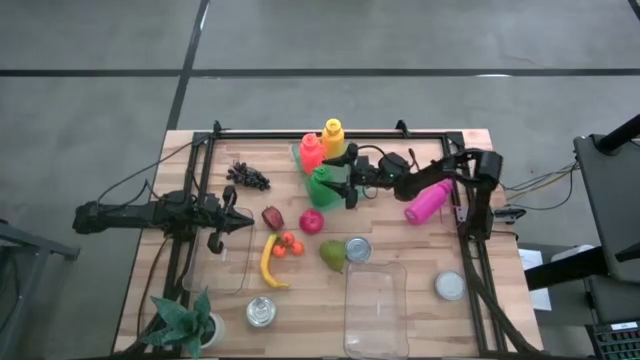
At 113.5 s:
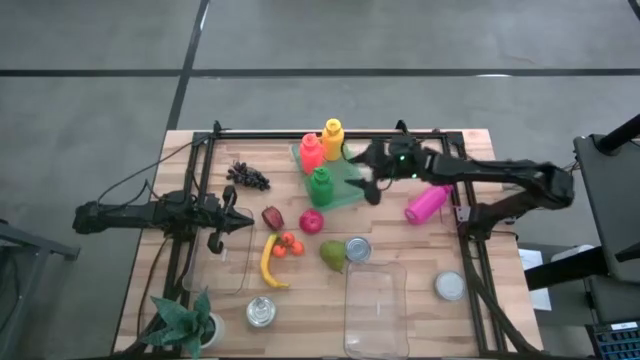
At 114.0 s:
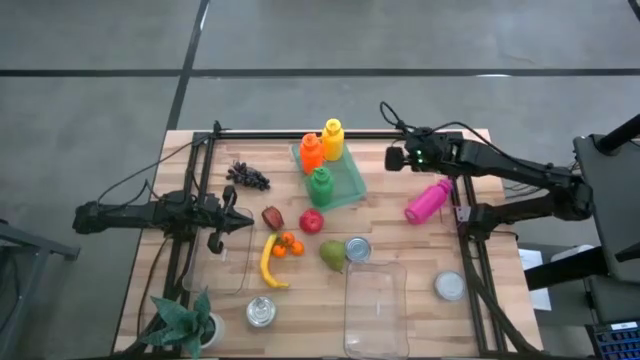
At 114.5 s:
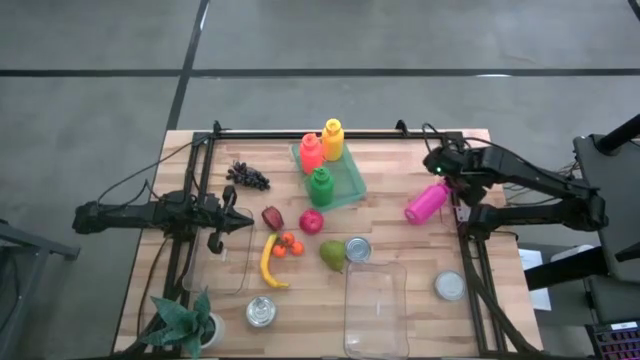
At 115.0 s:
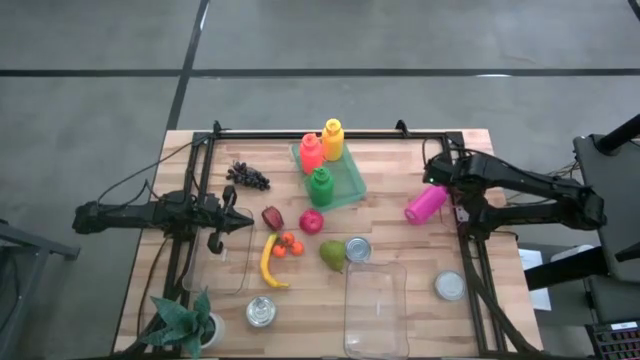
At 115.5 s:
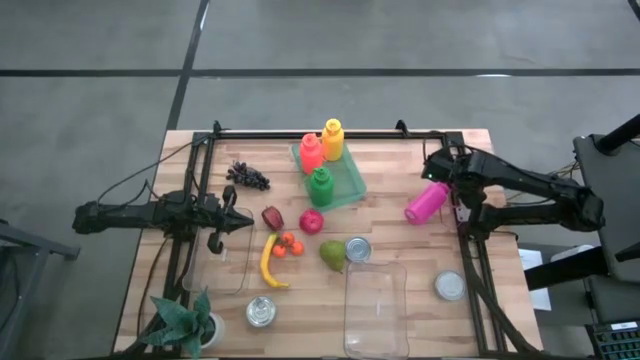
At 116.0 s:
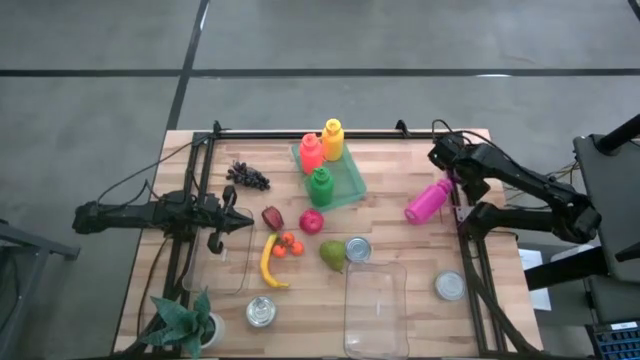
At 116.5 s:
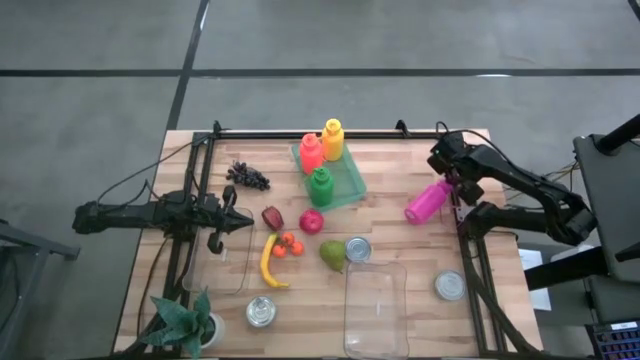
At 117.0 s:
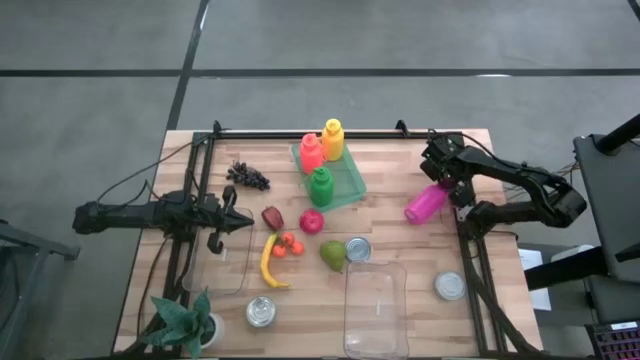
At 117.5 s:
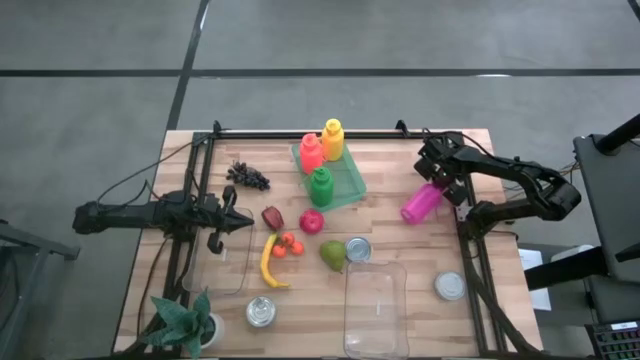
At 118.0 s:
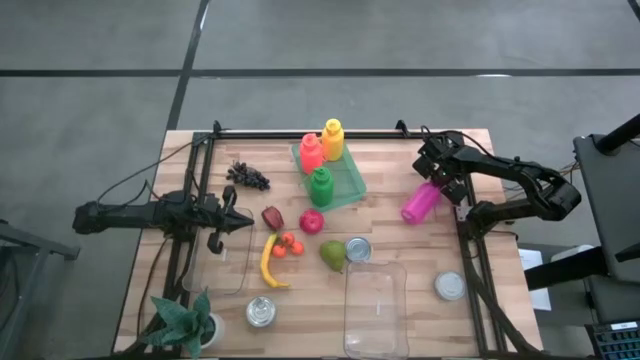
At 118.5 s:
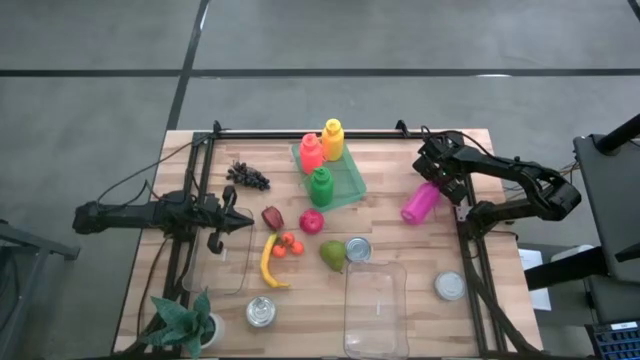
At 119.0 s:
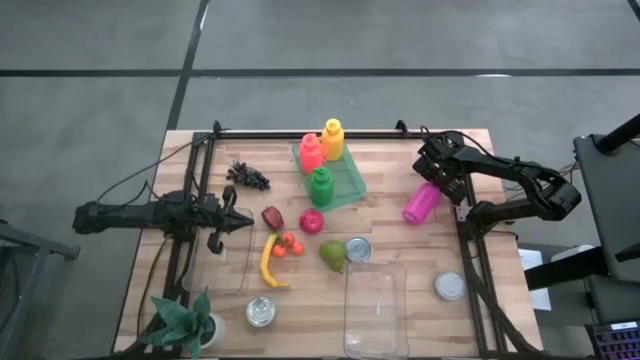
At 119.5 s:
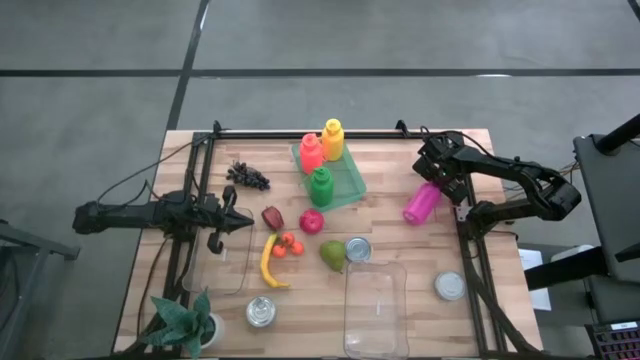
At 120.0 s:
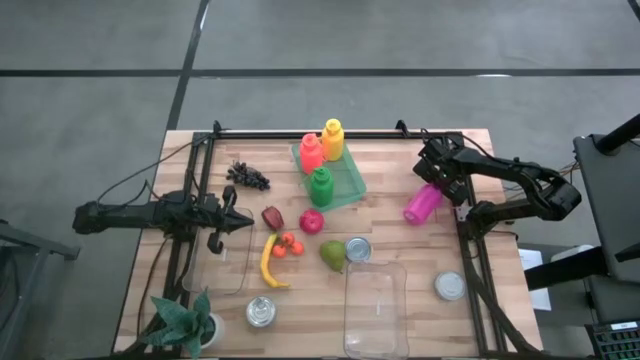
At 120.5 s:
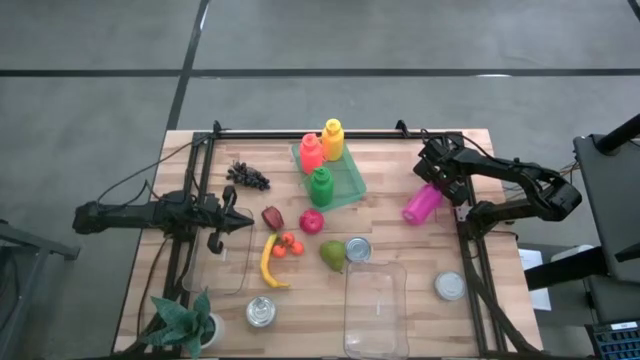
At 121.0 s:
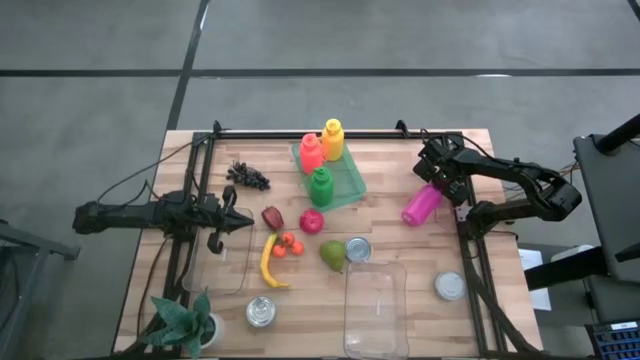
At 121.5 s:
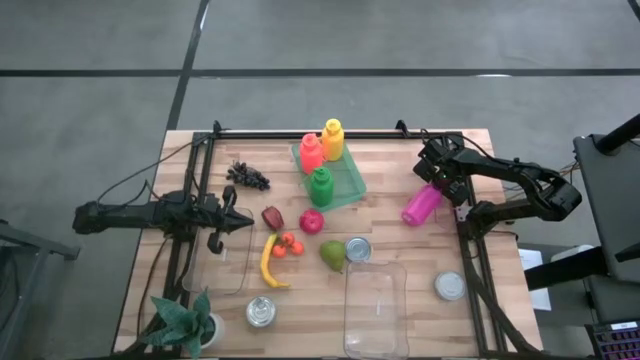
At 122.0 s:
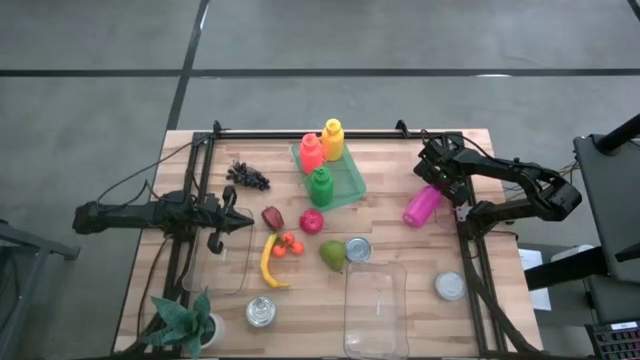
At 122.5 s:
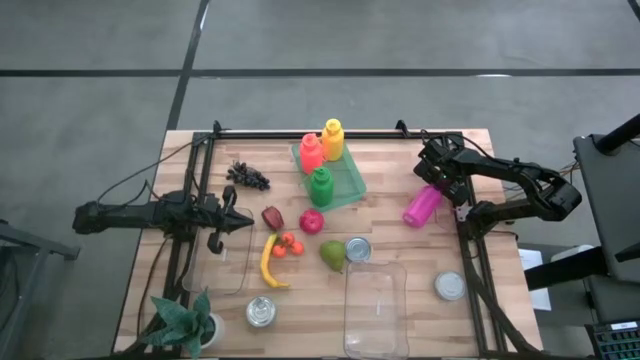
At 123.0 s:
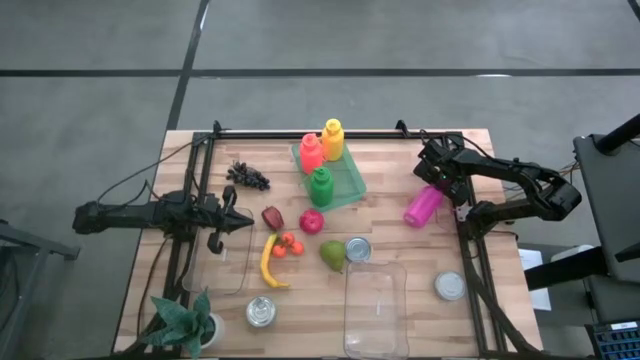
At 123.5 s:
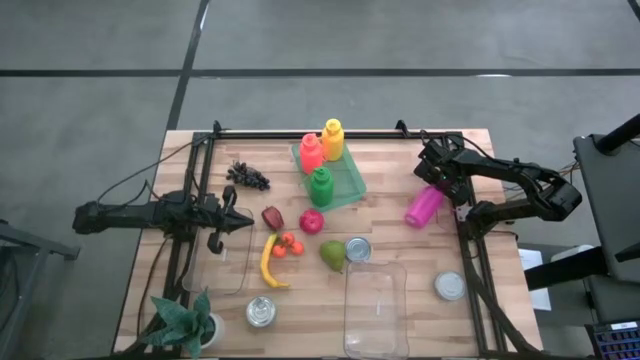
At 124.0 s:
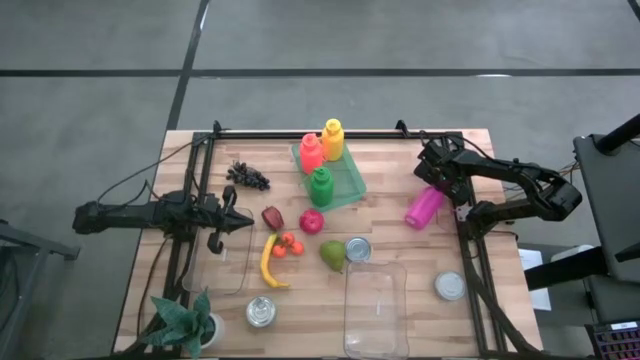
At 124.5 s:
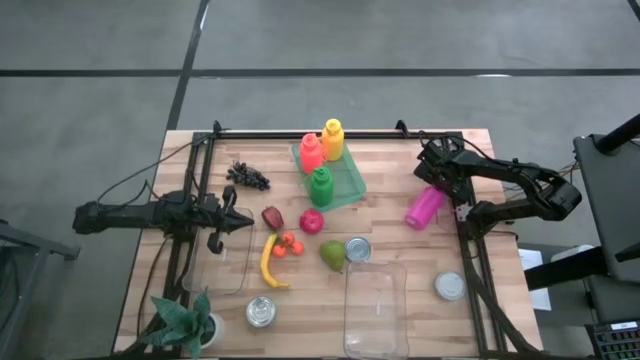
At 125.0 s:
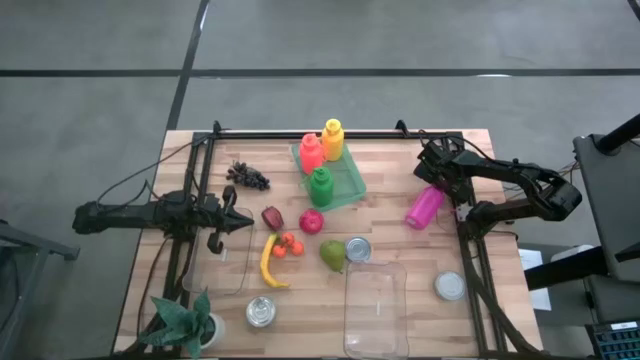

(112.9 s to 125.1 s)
Task: Pick & Place Food Item
Put the pink water bottle into the green bin

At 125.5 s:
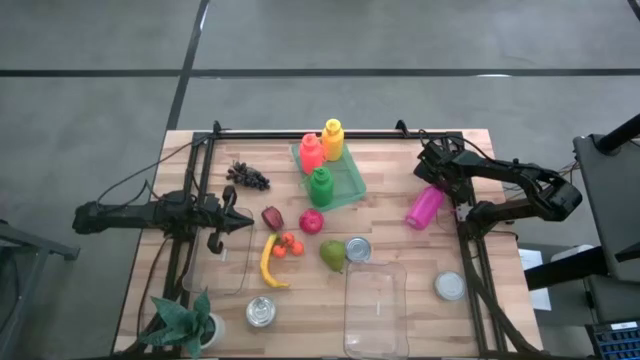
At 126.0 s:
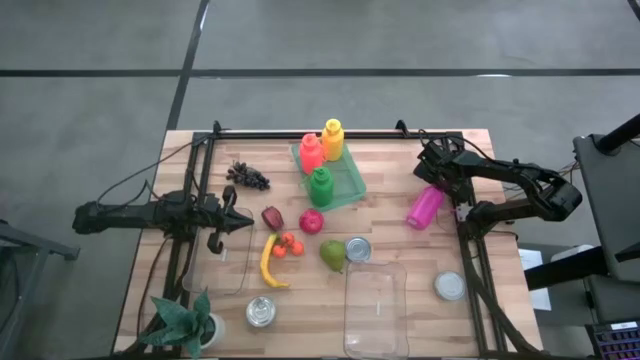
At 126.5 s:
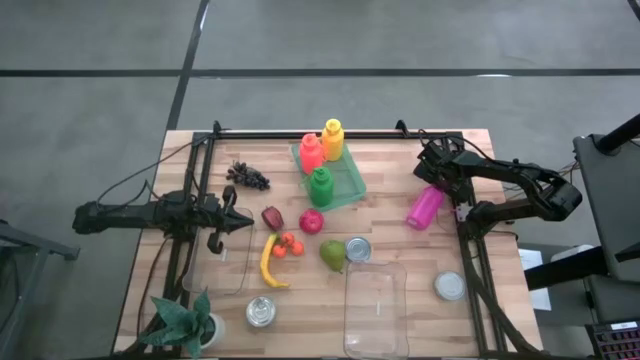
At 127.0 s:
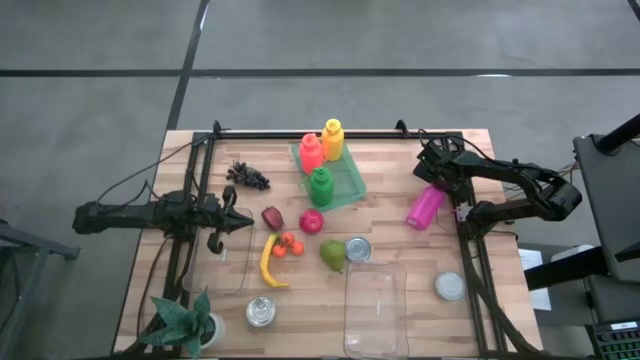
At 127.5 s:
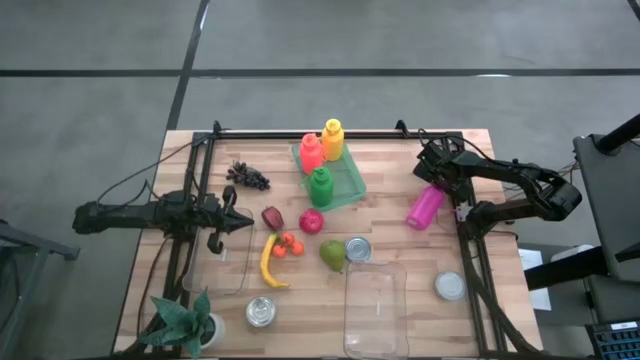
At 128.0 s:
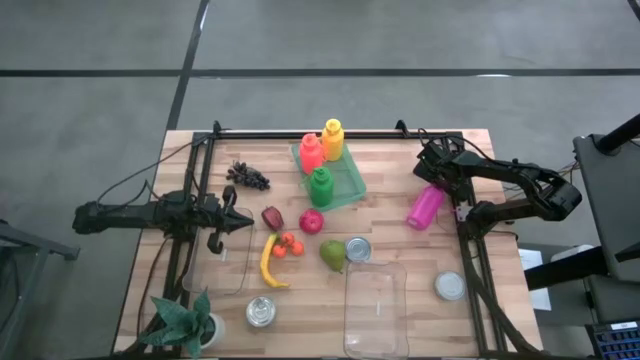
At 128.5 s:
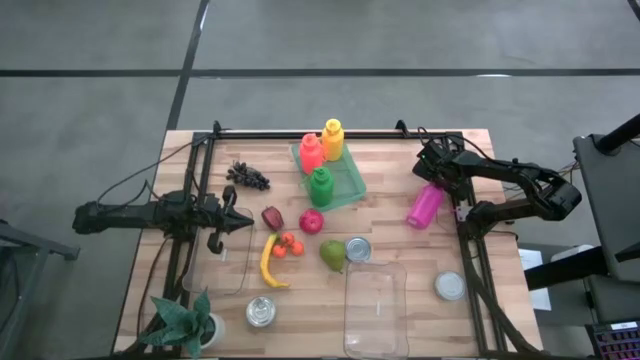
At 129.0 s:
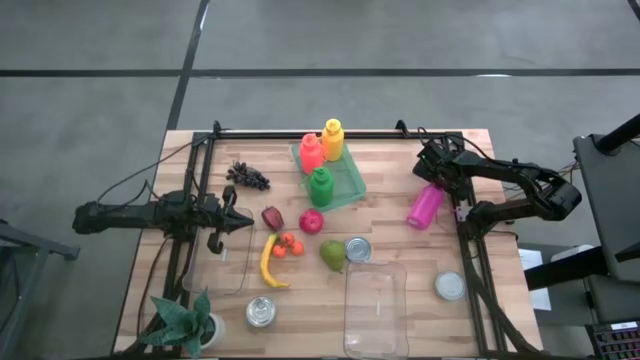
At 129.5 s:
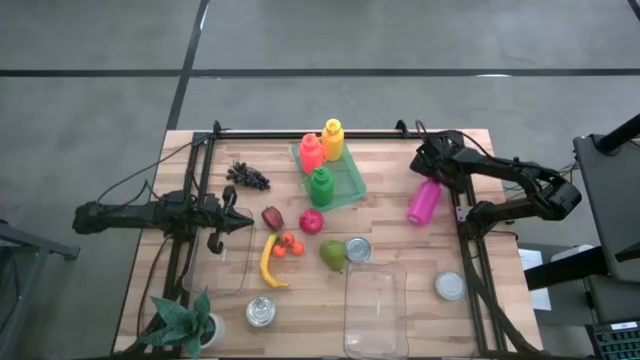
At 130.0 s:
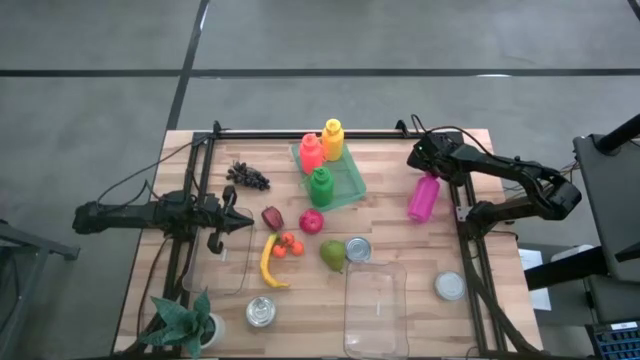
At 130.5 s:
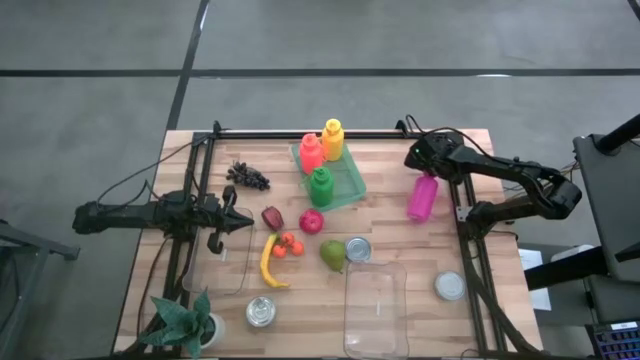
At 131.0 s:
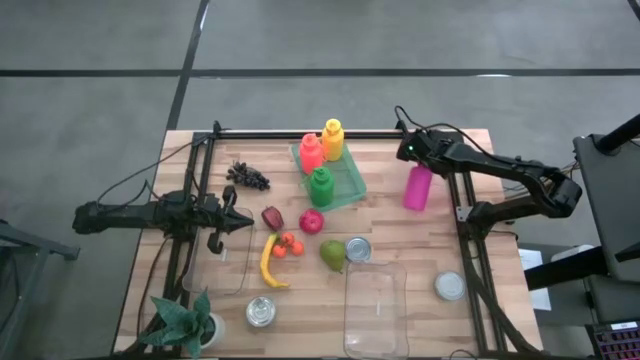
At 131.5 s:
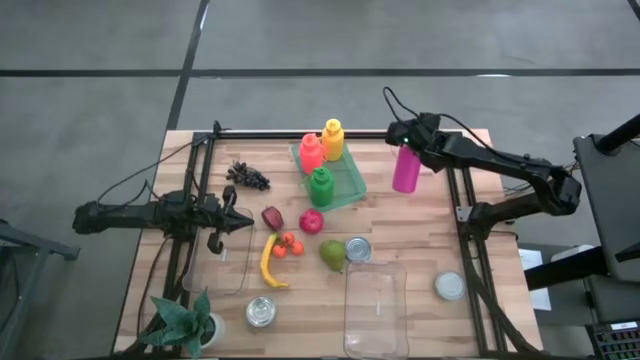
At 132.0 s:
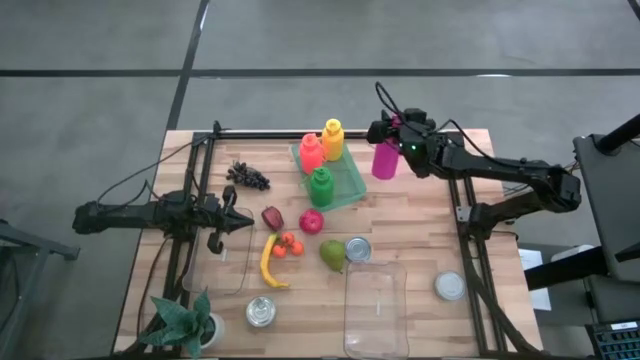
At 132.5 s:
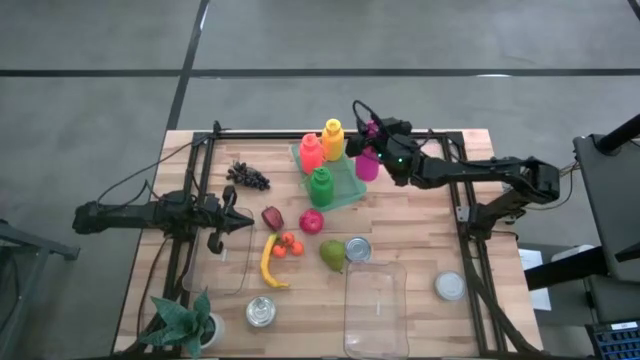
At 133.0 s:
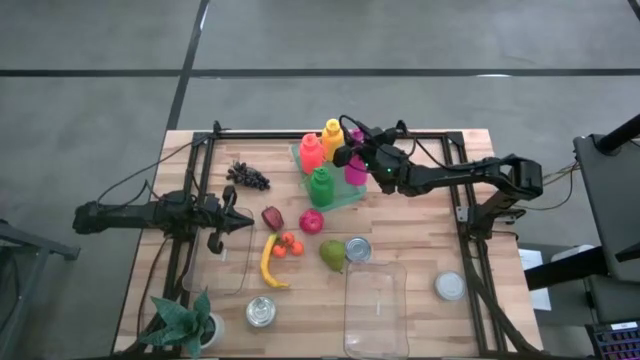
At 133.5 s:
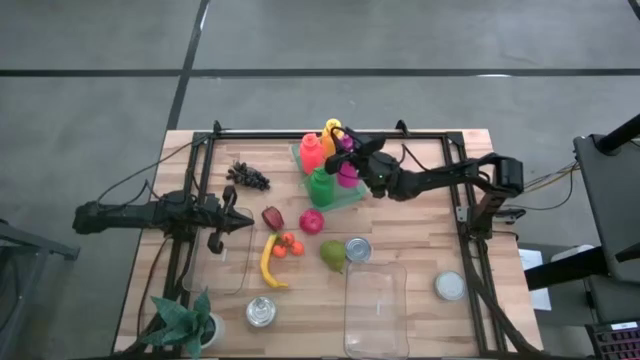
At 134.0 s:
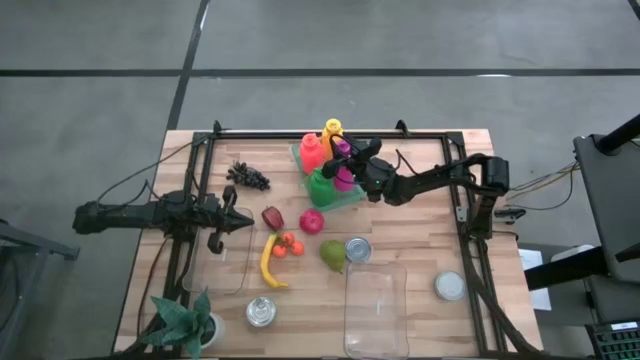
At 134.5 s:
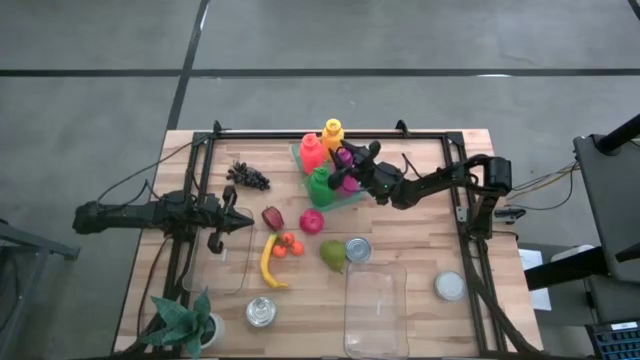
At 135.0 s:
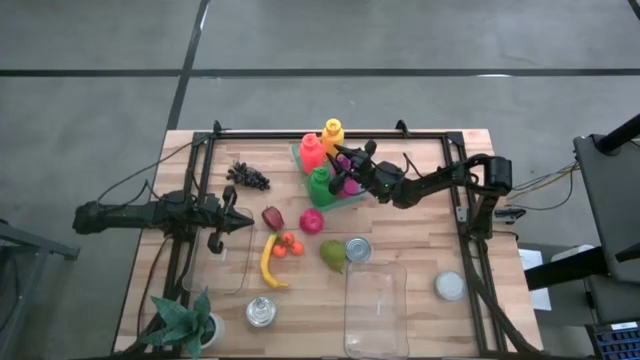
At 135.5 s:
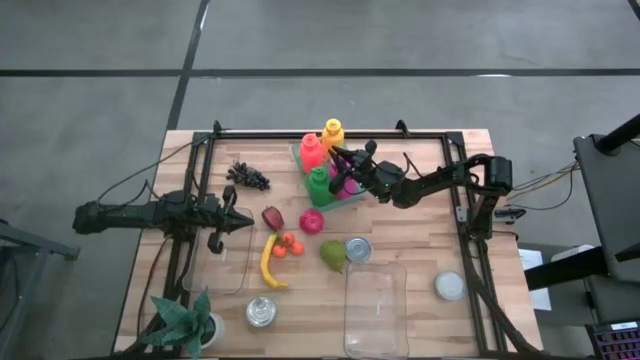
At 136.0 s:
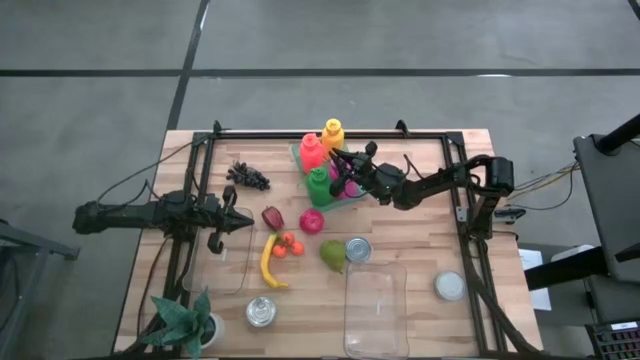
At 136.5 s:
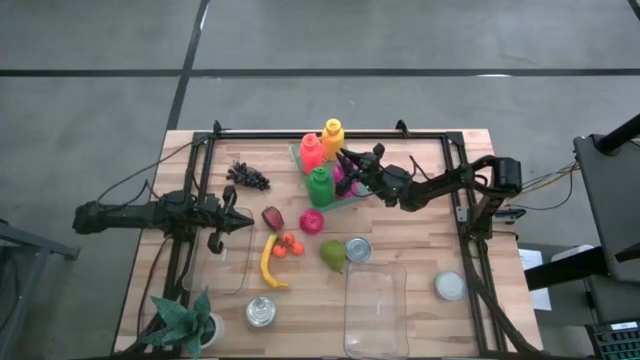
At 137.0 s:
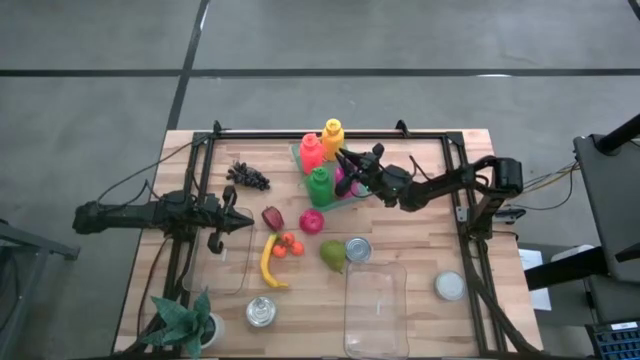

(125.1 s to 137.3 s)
Put the pink water bottle into the green bin
